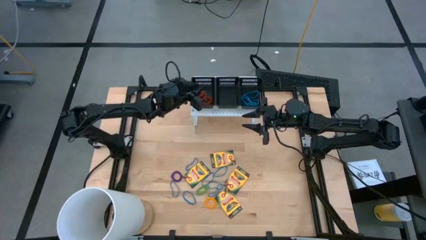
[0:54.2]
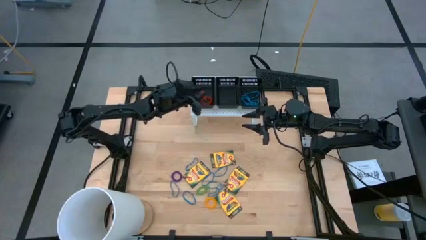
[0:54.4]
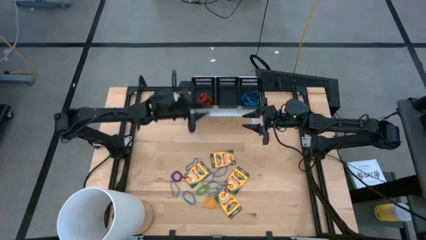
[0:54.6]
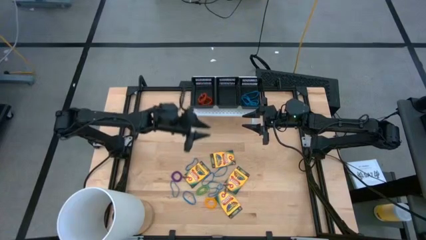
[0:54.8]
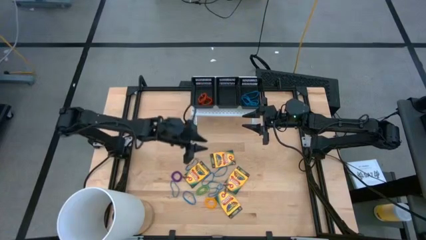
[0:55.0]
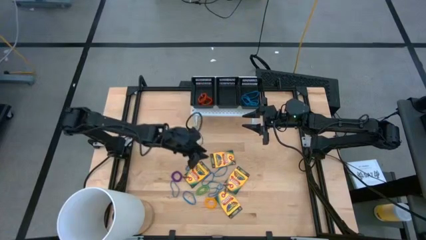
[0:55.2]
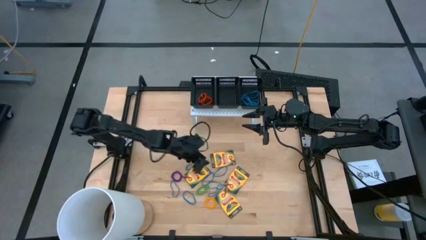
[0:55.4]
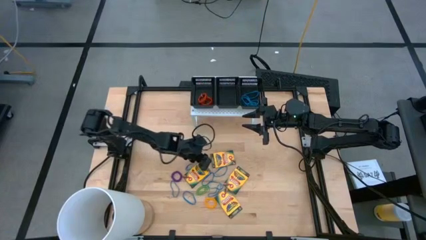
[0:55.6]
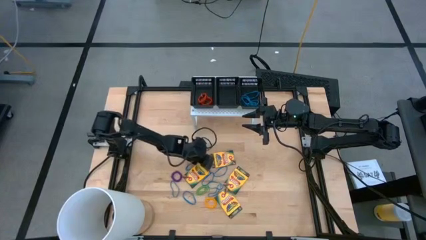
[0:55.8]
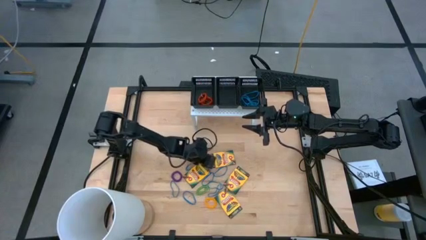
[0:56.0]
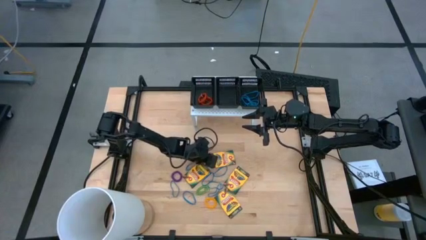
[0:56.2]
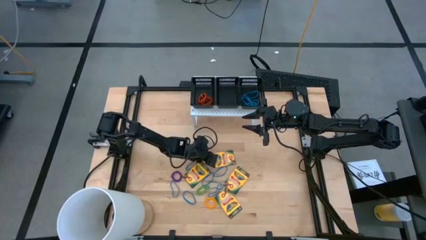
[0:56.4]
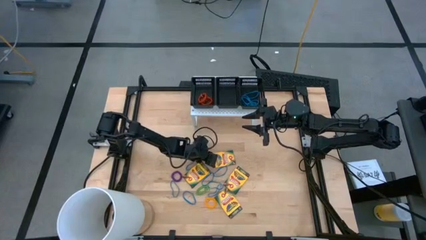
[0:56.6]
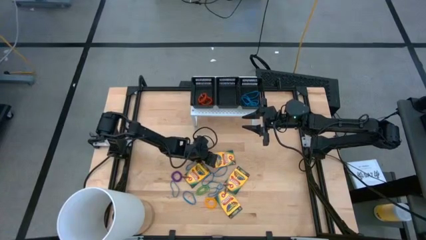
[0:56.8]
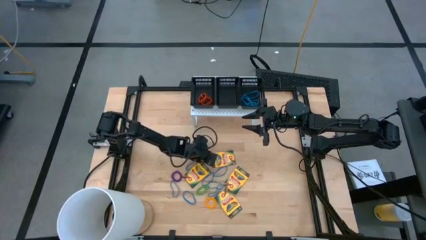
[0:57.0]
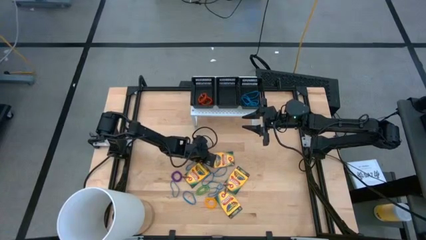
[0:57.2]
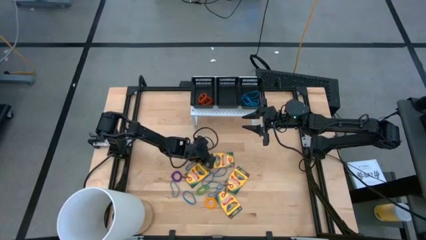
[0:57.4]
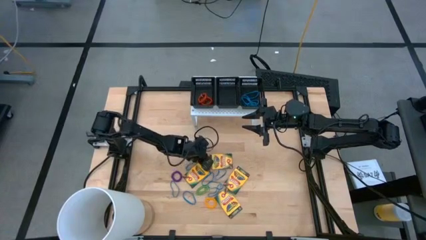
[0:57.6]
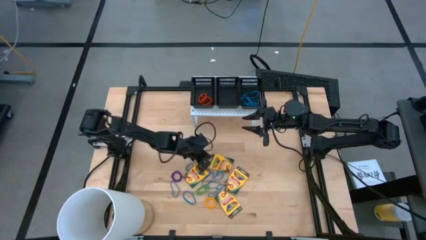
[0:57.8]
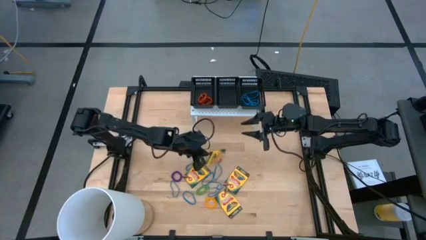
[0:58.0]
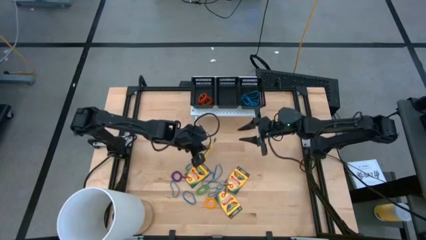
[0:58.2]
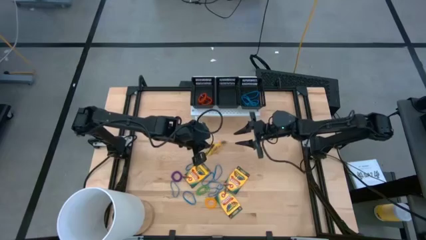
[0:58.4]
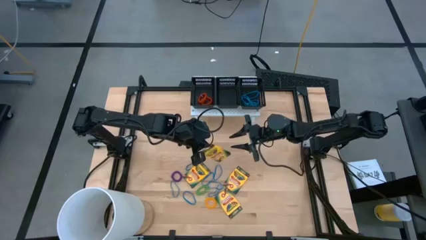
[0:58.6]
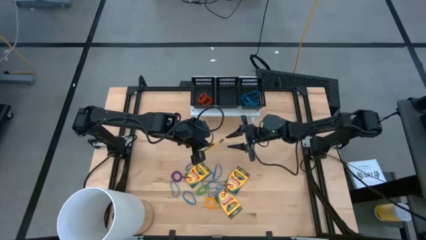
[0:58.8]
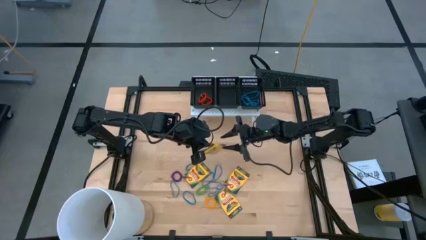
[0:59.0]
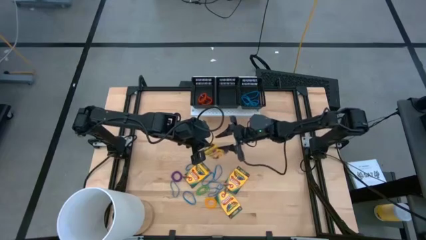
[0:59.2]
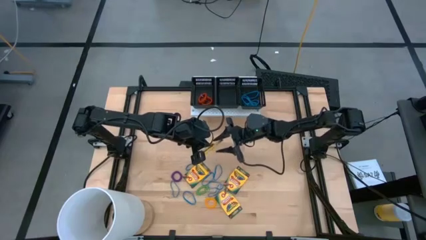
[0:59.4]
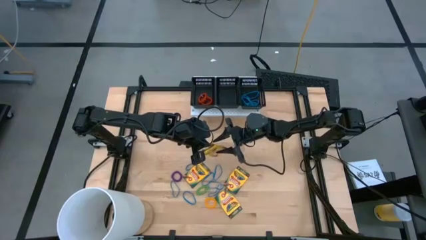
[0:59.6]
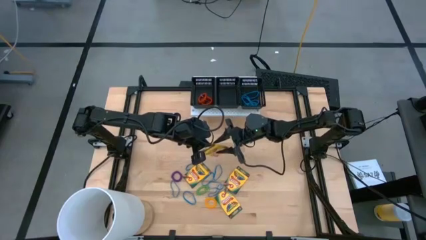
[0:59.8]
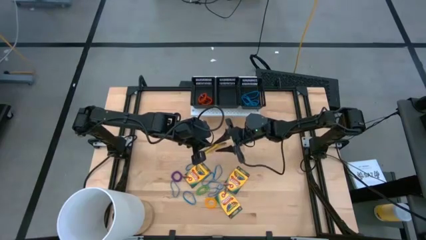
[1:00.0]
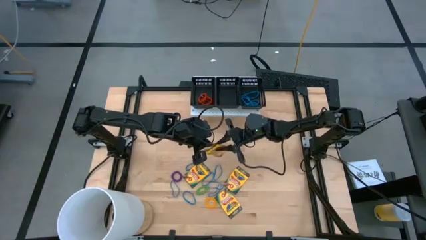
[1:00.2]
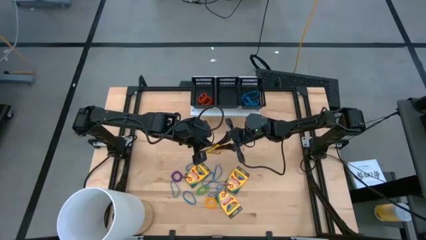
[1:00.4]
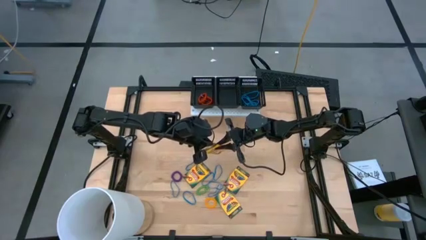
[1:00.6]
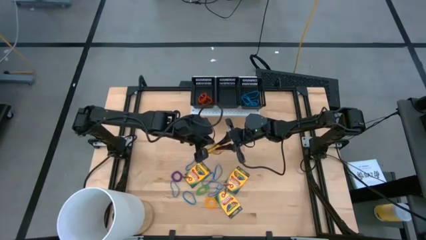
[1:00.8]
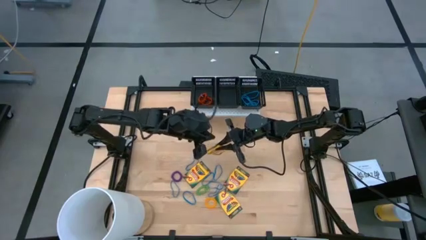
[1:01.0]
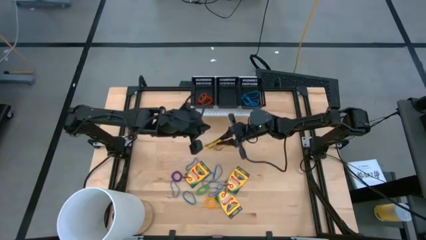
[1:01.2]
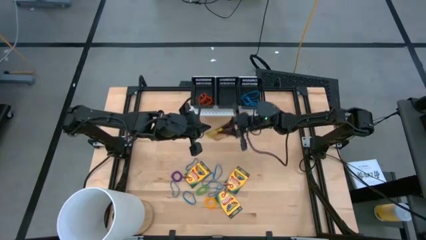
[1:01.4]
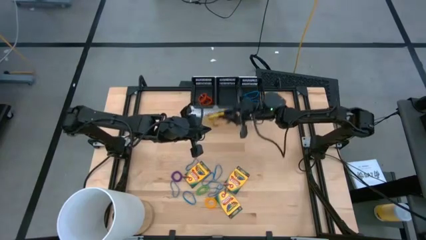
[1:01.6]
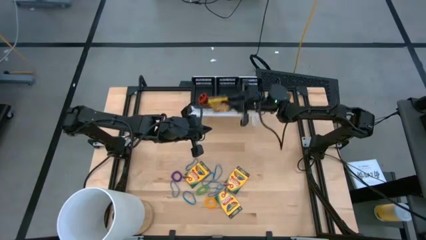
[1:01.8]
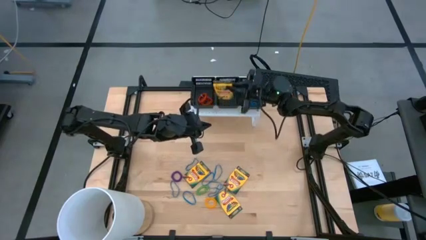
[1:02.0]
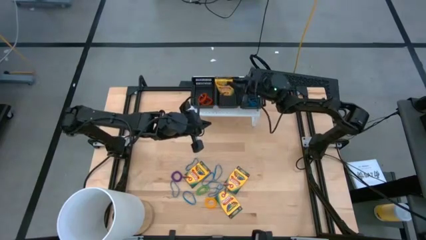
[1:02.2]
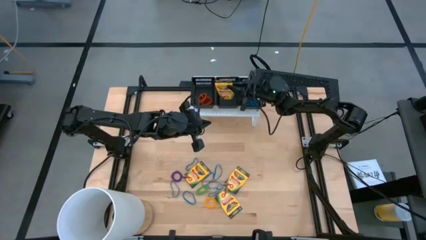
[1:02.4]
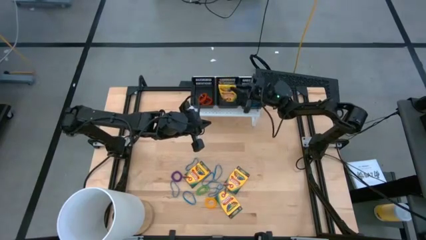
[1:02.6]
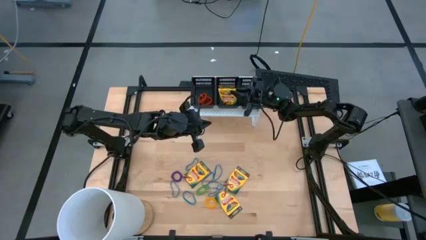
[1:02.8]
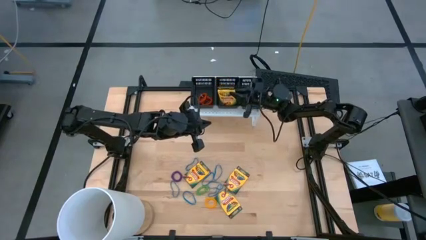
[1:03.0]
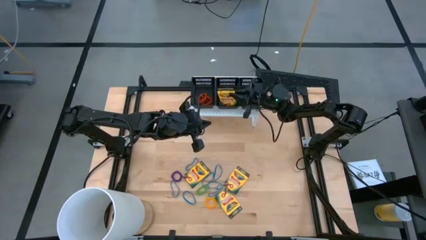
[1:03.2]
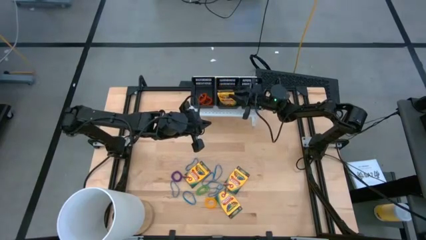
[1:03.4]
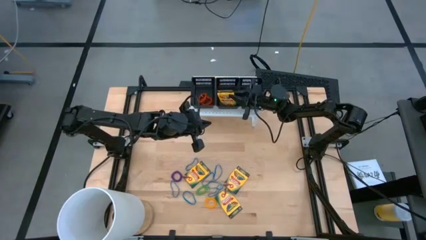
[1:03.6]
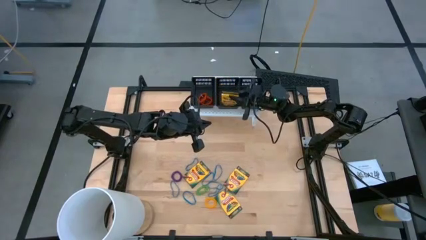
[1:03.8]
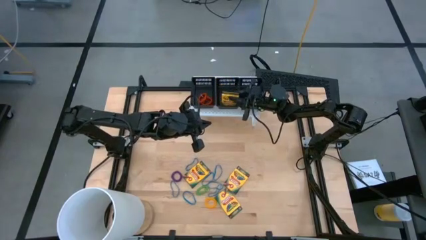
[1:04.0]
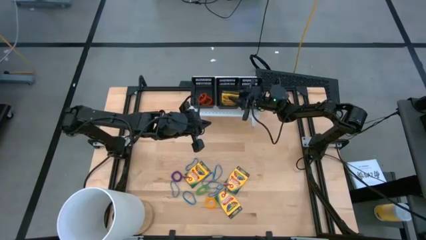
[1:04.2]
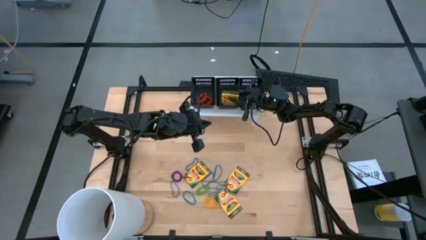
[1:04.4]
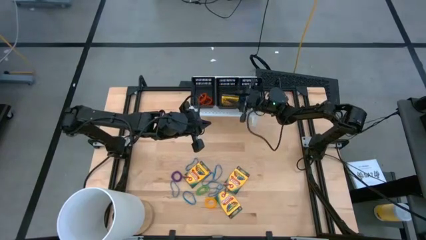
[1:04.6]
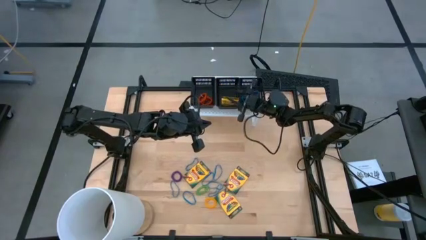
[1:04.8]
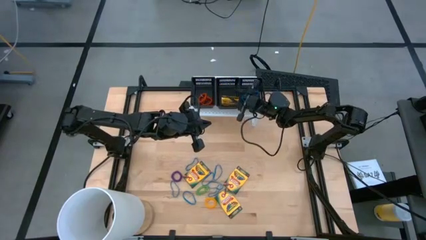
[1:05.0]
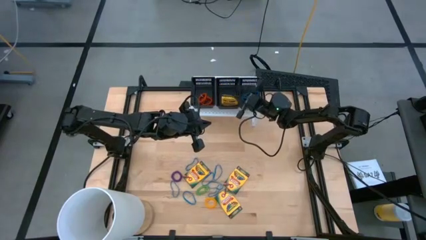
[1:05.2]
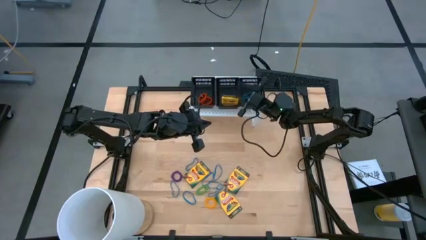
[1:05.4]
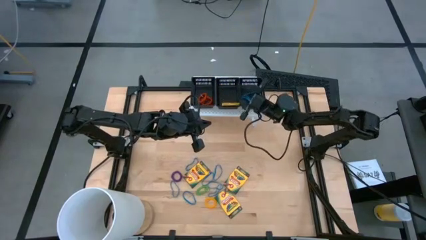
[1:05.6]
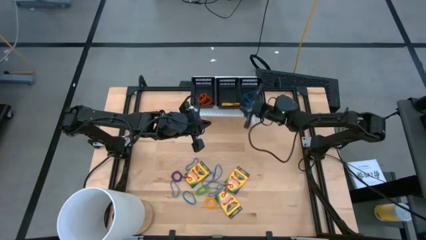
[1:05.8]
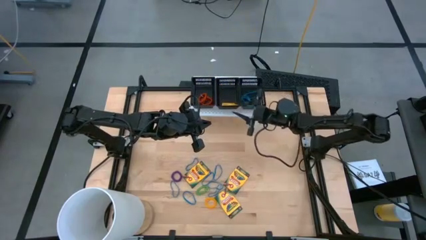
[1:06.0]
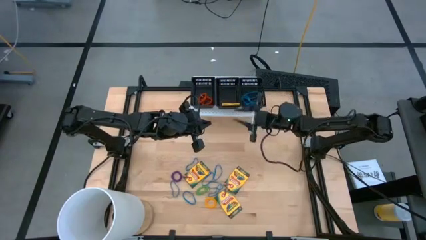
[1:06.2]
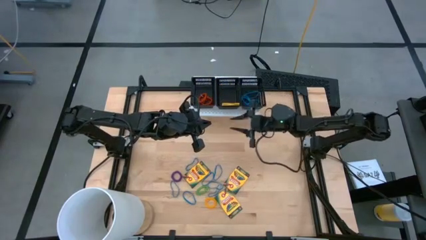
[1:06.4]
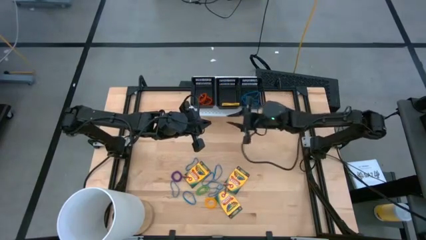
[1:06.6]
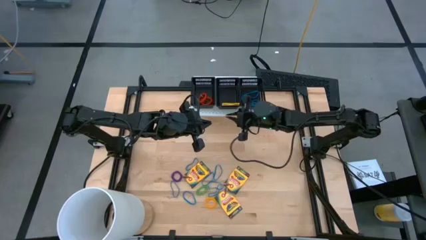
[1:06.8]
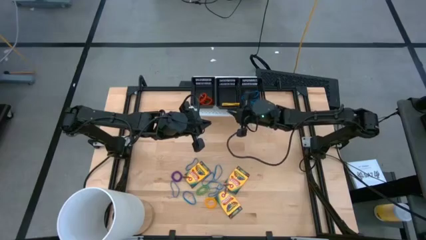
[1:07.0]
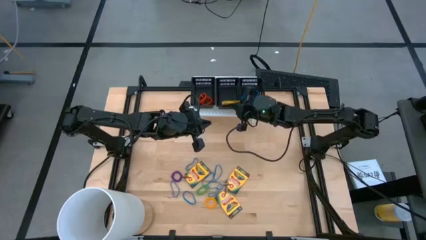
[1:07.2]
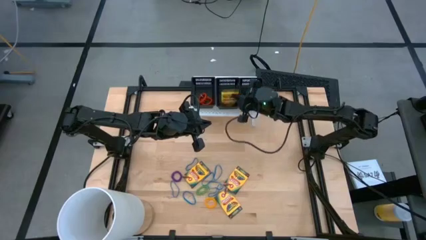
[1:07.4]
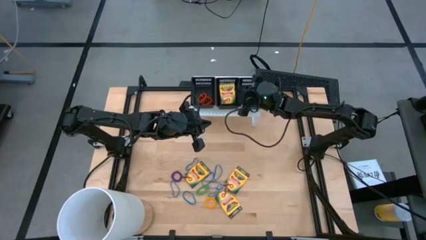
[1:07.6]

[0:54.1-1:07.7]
Task: Pick & Place Office Desk Supplies
Put the crayon box into the middle black bin on the shelf

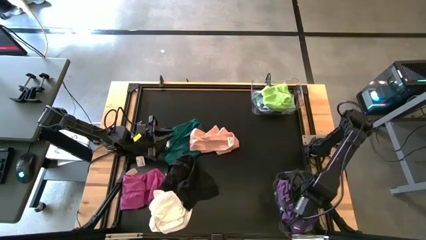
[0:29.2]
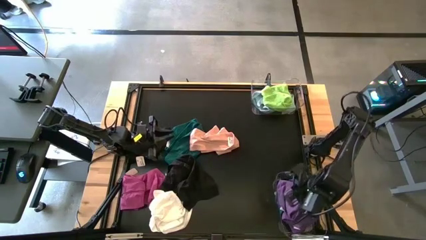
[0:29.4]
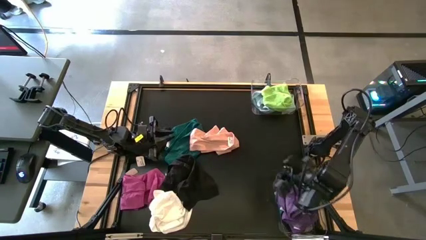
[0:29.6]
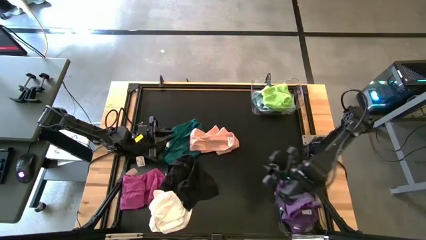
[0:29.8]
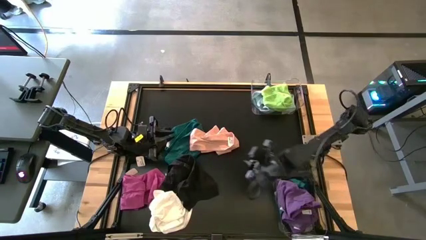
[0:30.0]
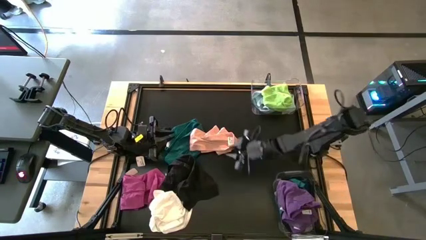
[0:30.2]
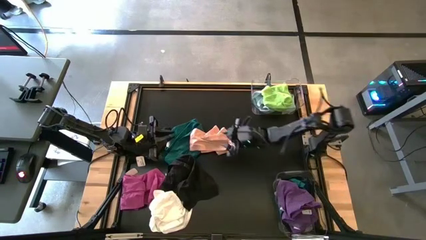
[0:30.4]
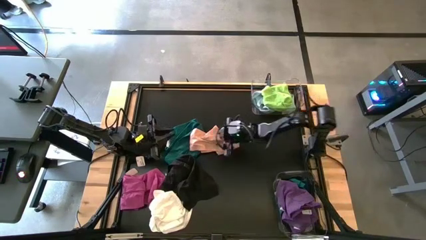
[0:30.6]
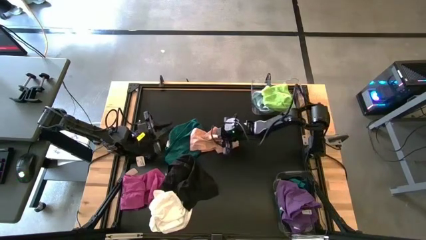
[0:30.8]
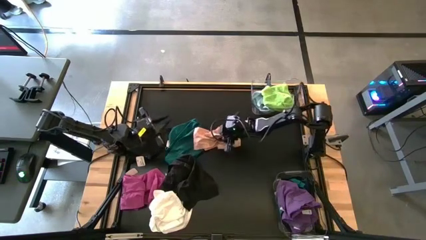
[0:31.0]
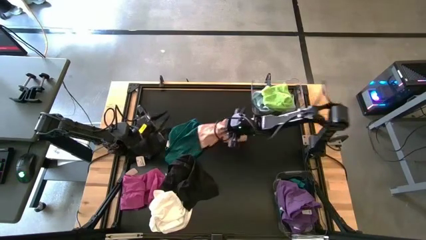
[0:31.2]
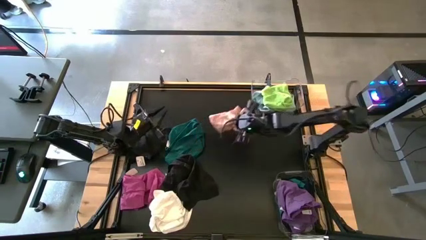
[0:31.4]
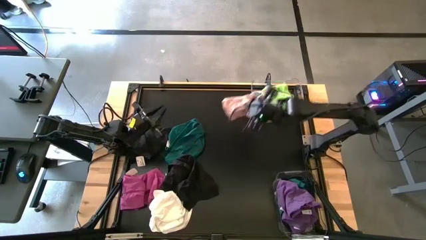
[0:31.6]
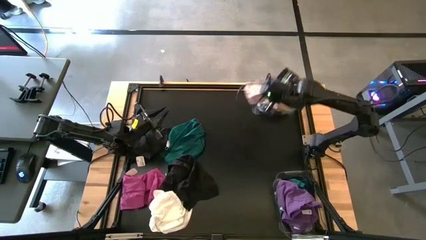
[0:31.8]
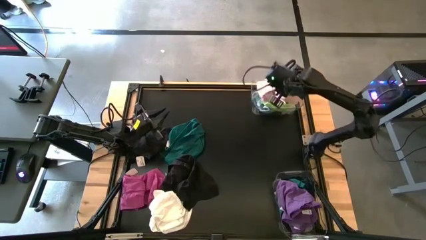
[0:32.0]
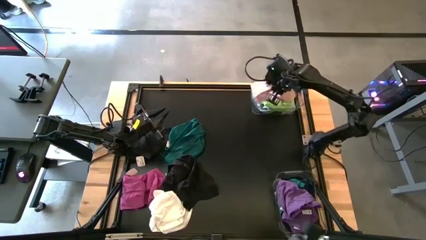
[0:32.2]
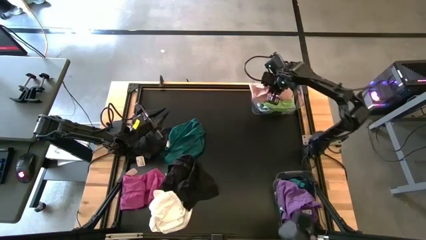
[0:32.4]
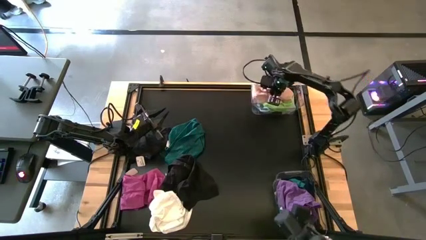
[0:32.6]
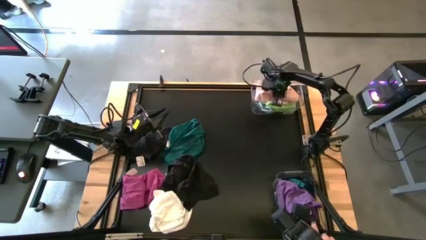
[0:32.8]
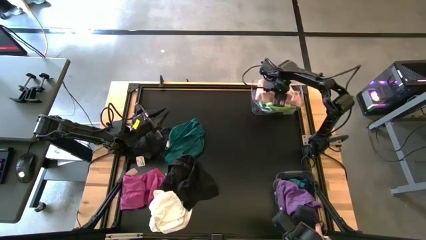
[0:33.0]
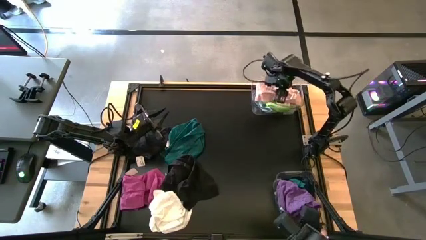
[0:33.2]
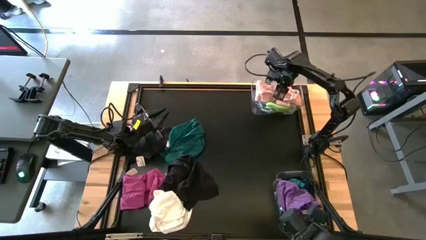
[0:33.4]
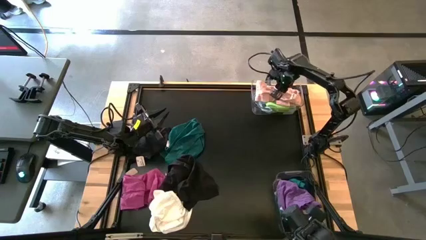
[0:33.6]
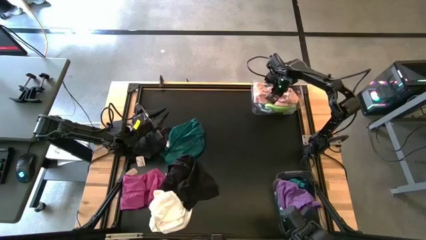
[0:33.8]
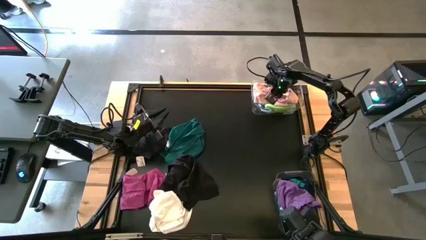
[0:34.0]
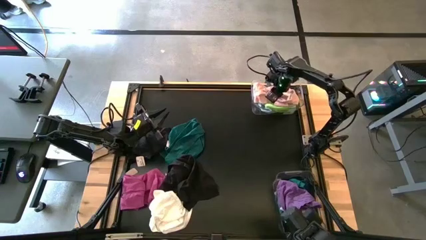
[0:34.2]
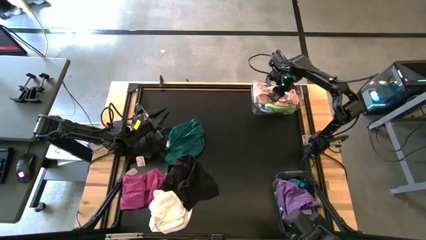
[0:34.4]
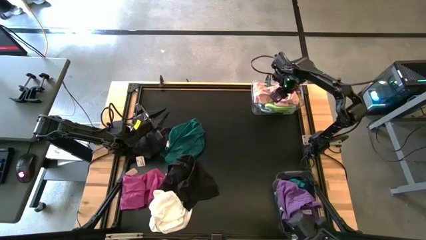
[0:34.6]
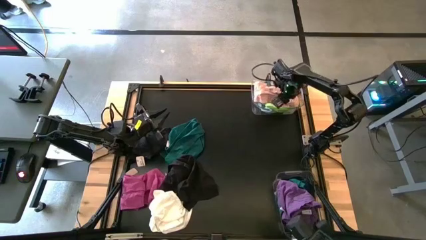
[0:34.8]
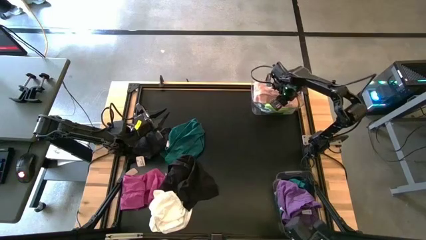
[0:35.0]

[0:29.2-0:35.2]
Task: Sort towels by color in basket
Put the light orange towel into the top transparent bin
